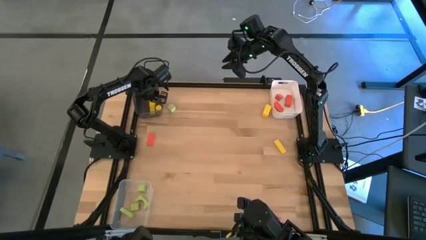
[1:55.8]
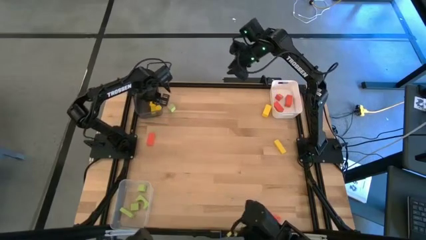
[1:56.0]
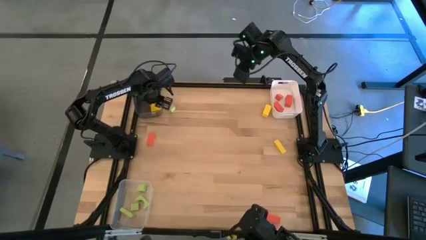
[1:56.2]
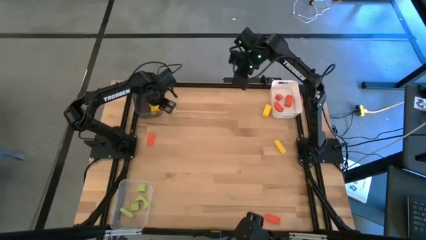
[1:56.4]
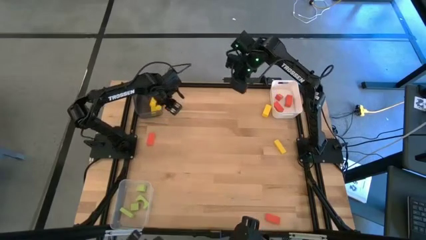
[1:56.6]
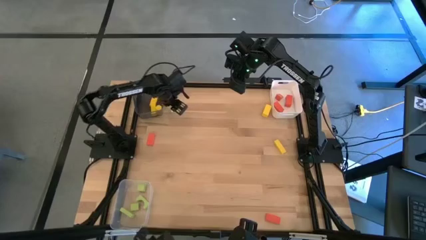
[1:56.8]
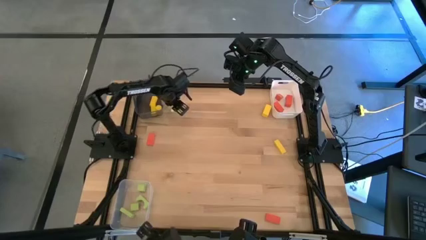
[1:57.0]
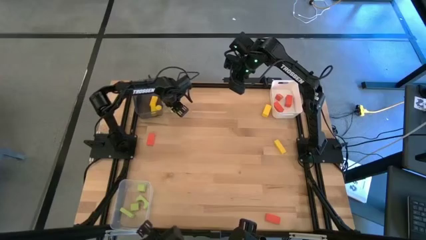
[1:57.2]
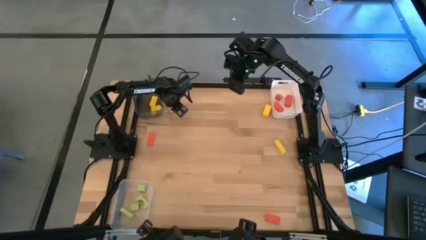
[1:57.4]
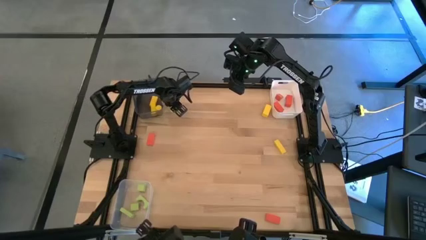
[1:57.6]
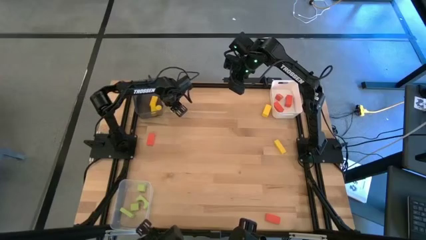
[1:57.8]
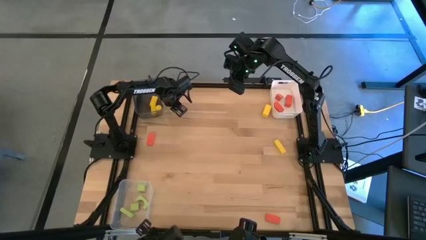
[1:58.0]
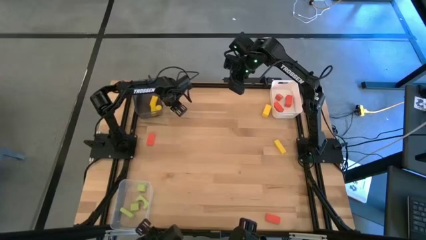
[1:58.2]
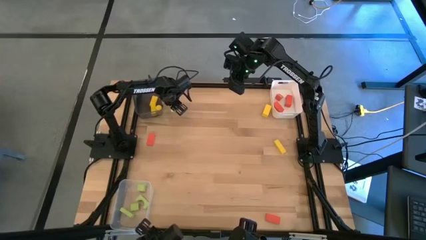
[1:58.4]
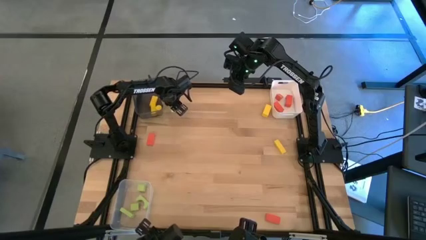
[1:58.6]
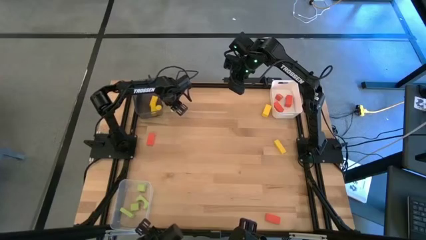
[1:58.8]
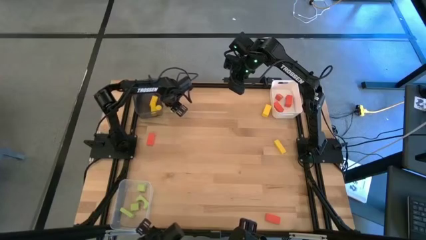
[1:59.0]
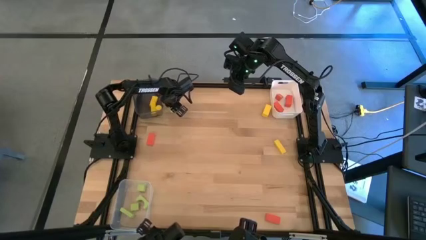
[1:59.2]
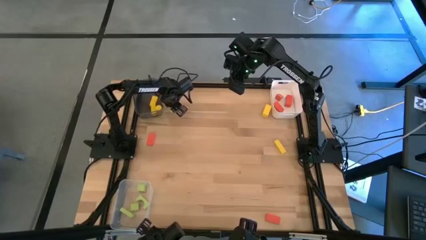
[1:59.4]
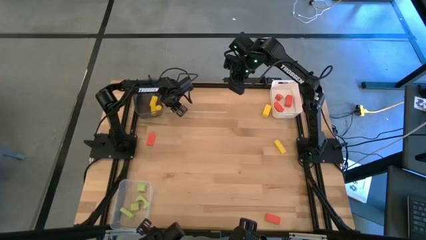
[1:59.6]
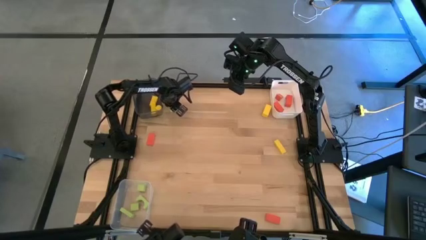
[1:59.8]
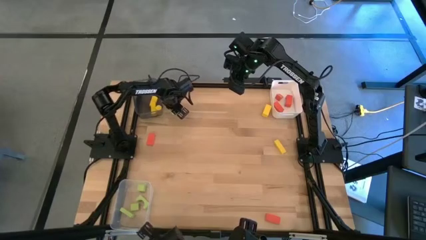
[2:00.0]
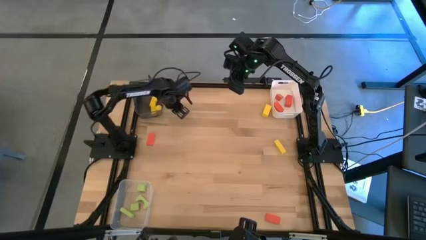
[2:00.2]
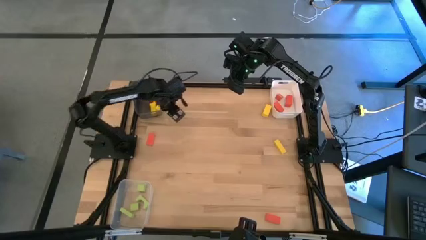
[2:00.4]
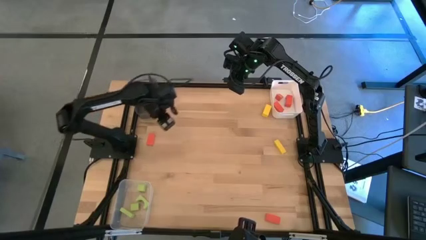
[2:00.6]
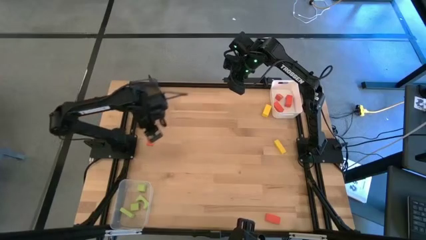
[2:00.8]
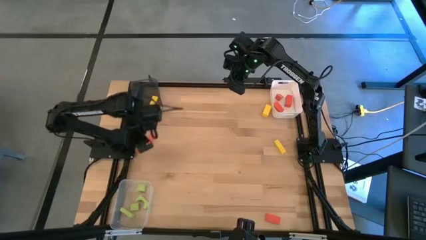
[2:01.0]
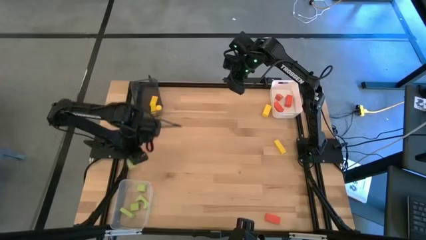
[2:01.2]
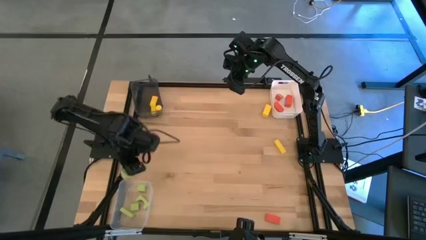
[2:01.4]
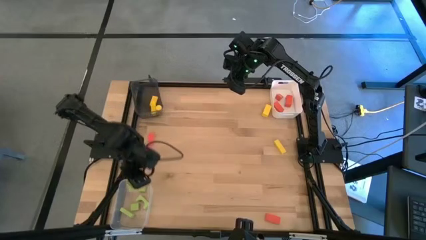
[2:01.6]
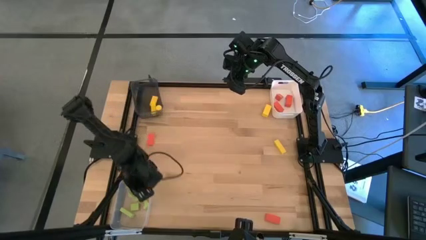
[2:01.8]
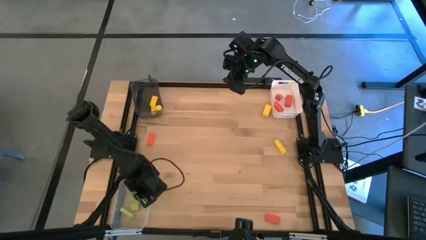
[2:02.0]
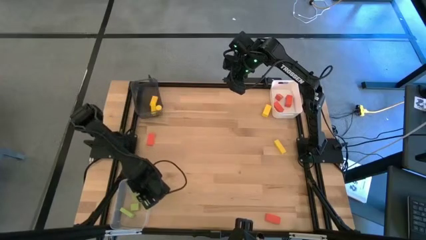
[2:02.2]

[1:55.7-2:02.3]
Task: Sort & place blocks by color
Put the green block into the transparent bin

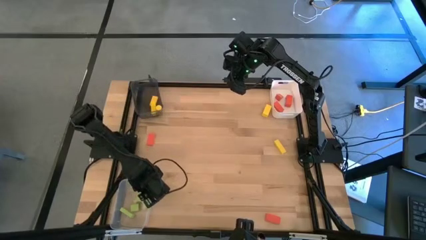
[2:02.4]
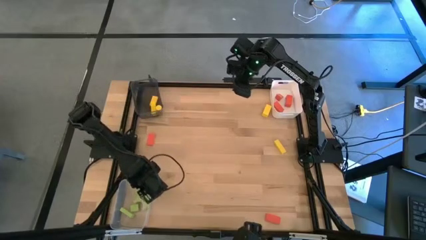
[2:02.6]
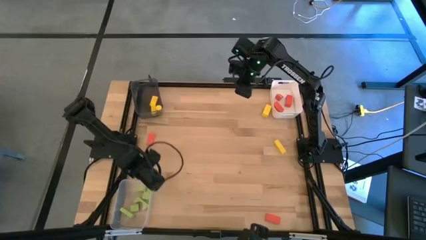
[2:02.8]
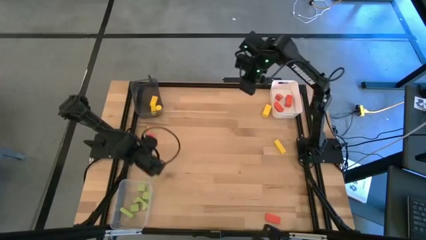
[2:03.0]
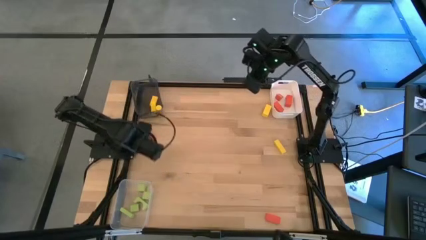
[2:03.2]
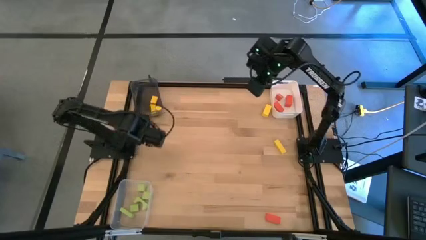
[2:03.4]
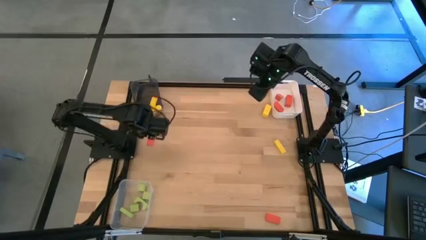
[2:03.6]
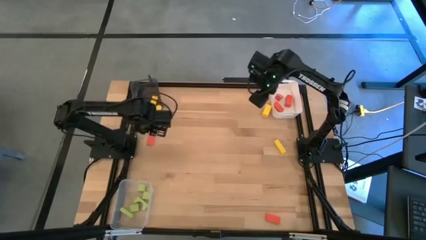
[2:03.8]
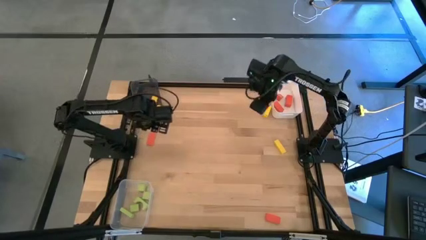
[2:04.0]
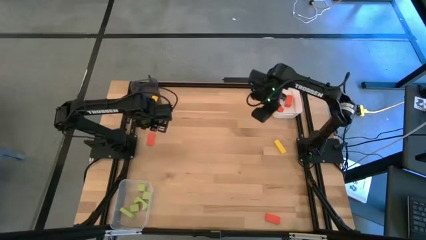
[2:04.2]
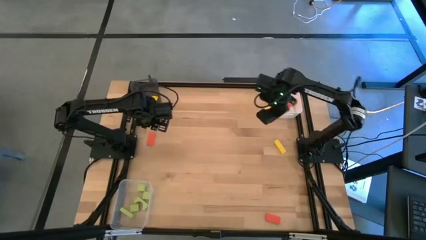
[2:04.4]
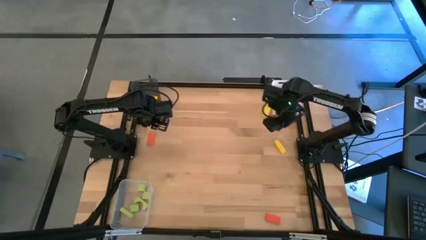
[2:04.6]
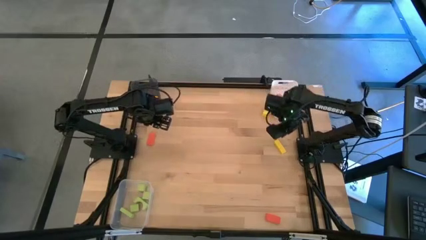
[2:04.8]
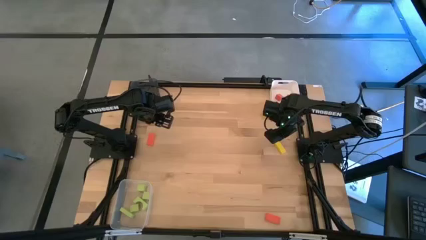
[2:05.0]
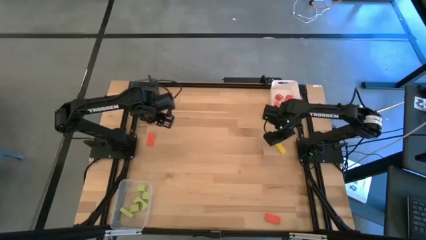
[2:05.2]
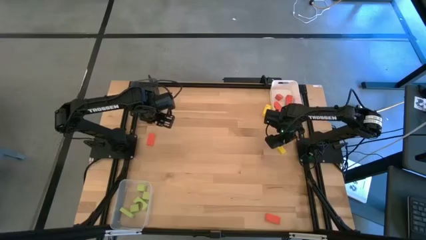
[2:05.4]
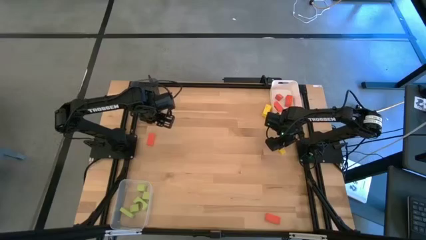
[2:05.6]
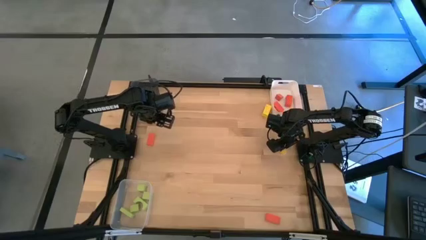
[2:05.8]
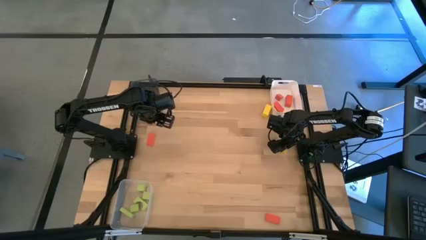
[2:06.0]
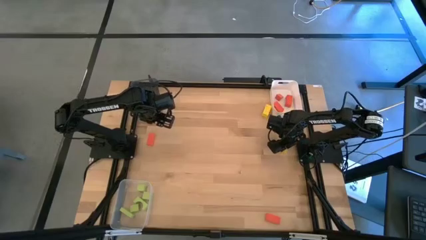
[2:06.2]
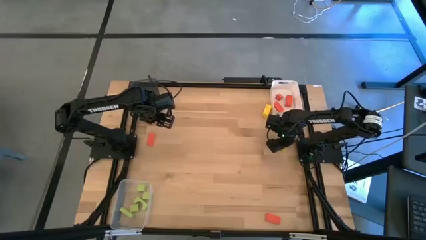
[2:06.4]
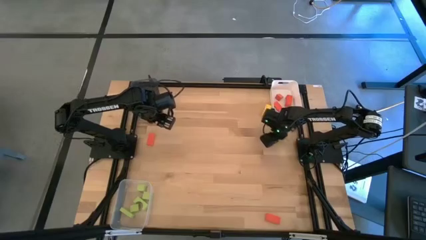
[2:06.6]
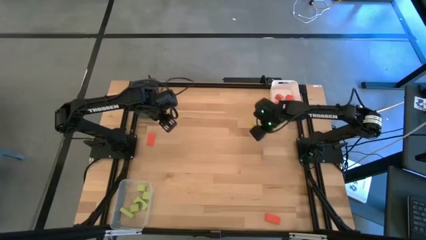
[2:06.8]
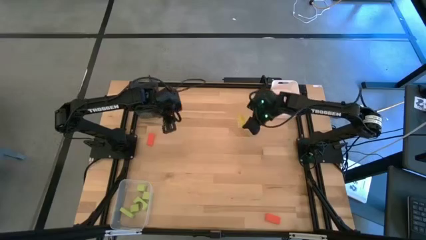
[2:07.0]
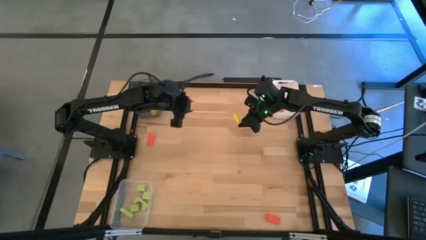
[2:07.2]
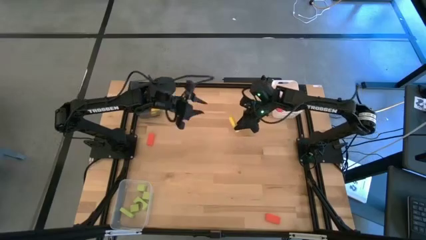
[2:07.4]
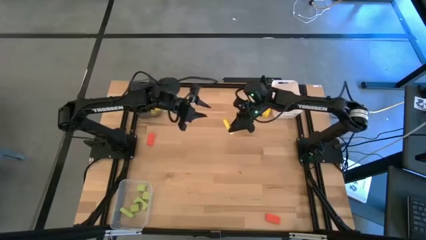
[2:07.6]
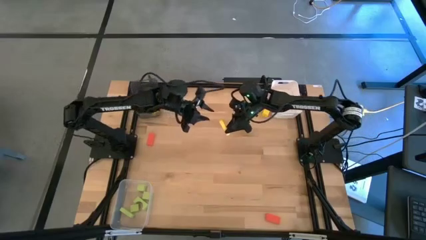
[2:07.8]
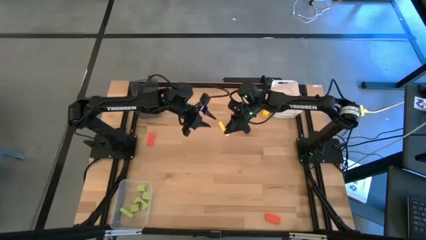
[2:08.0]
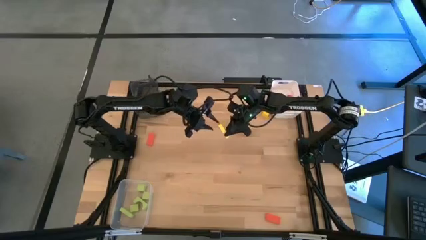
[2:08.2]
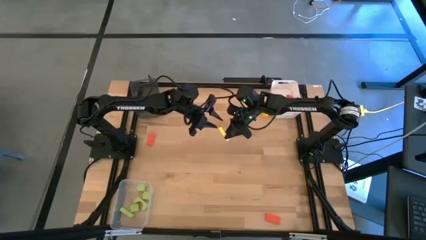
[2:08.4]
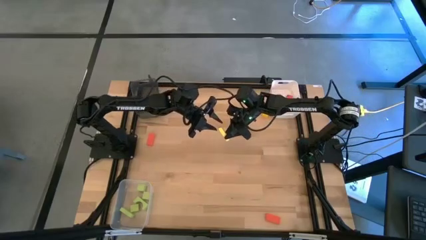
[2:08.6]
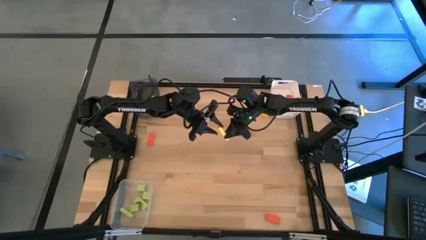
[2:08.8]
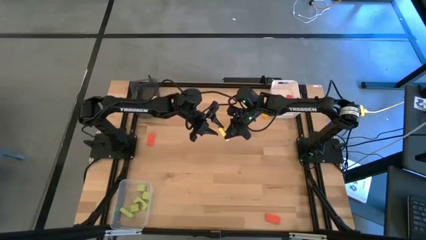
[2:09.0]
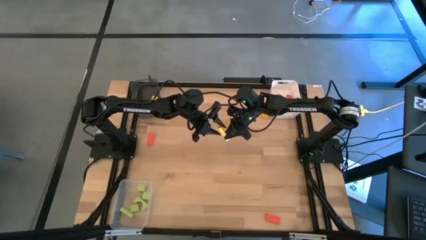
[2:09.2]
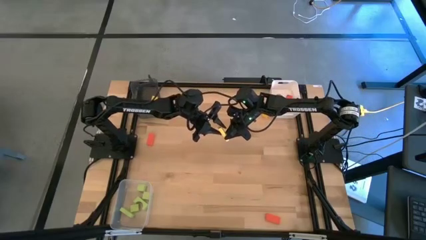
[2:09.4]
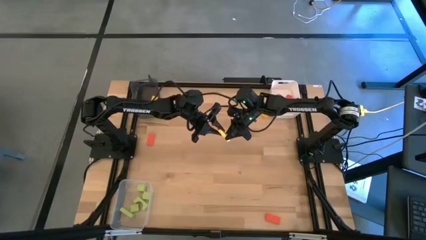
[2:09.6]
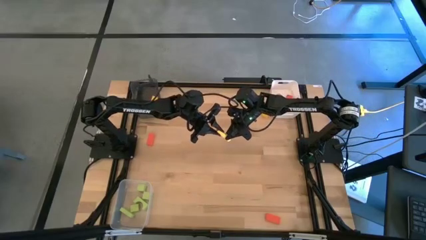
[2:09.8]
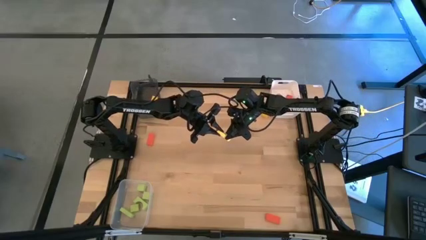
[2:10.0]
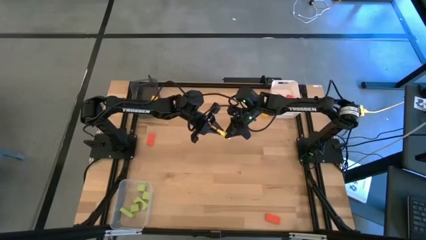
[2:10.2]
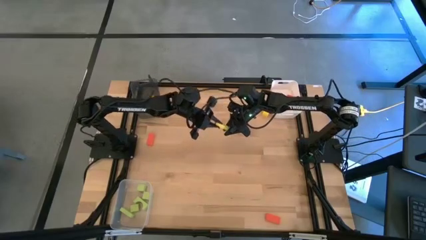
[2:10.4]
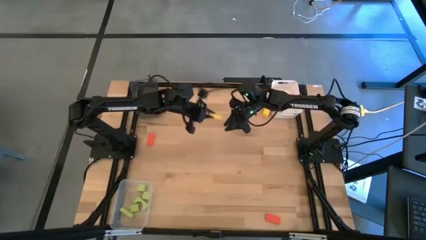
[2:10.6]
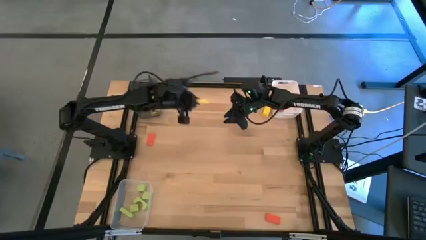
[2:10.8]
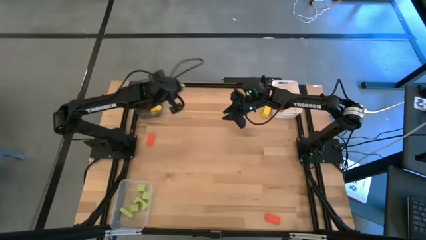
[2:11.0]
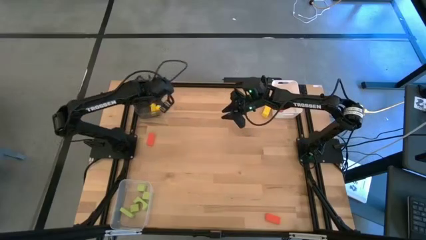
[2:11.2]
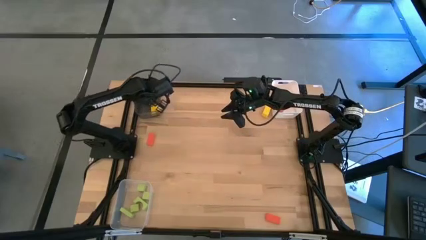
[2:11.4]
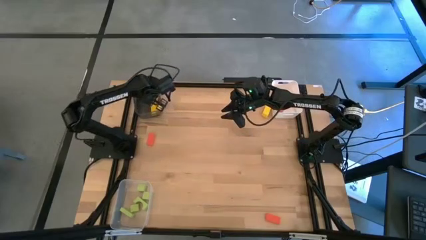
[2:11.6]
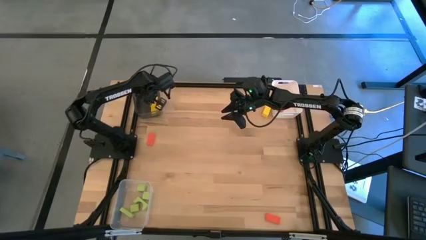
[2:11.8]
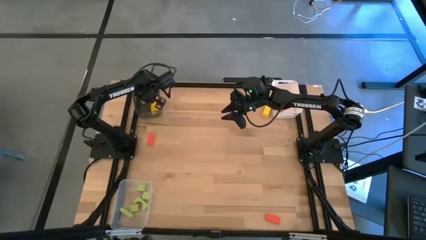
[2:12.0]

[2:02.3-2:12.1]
Put the yellow block into the black bin
